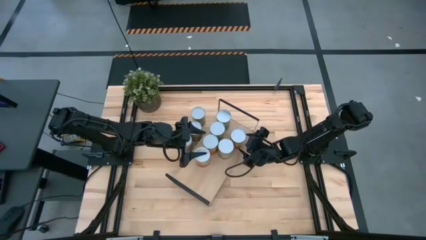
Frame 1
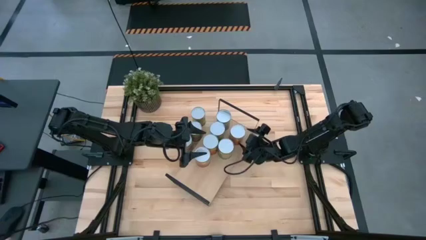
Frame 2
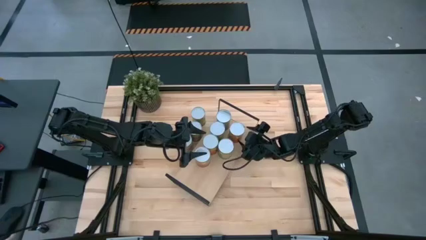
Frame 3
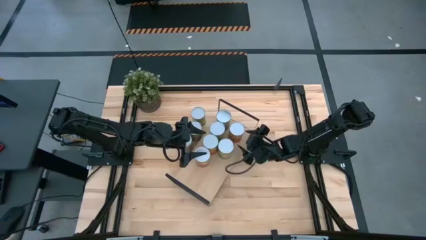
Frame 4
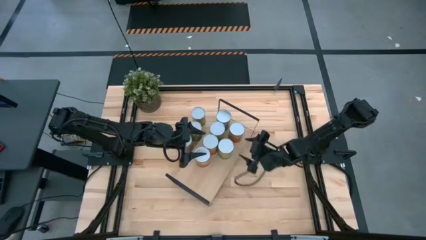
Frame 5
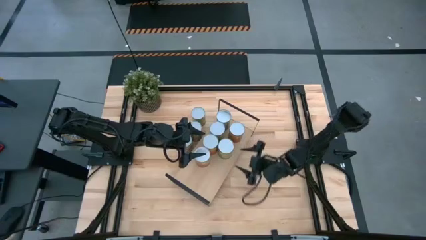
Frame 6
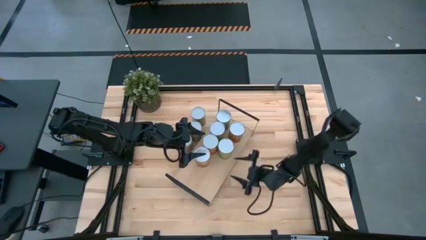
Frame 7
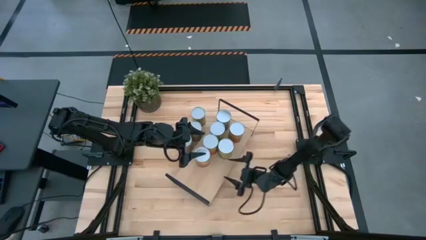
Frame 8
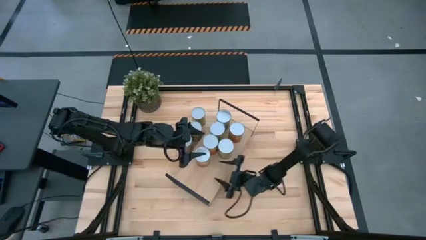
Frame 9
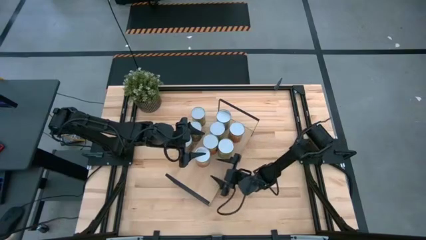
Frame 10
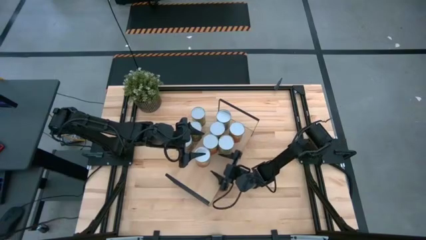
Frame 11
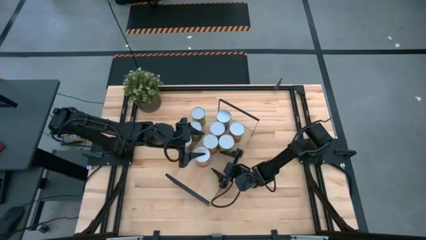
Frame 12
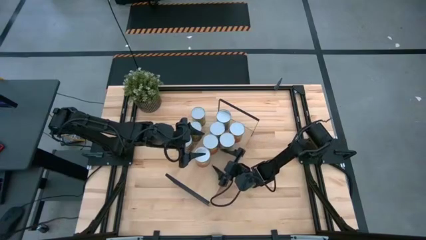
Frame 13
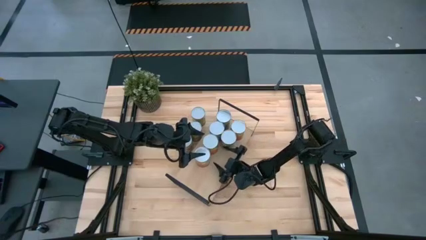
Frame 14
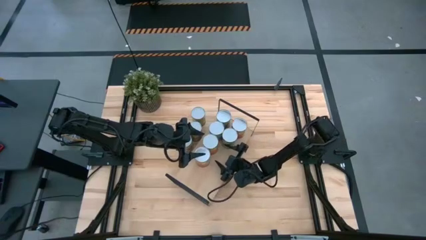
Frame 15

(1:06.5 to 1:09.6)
Task: Pick and place cans onto a shelf
Adjust the pineapple cans to the right of the shelf

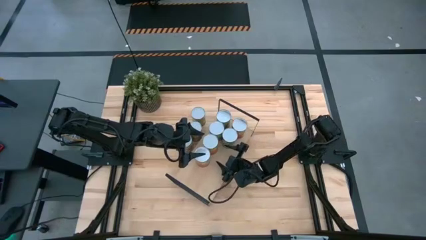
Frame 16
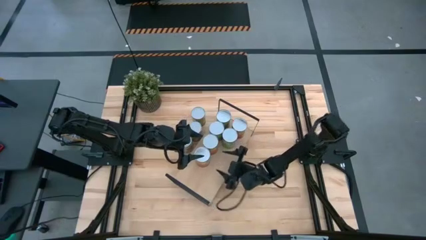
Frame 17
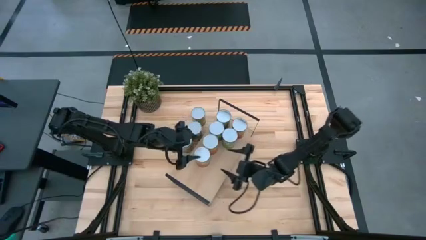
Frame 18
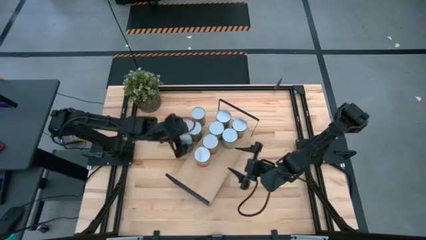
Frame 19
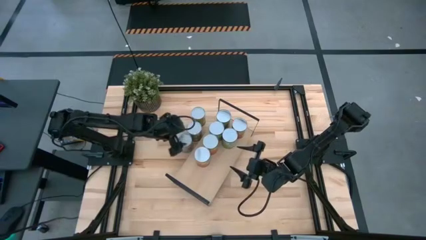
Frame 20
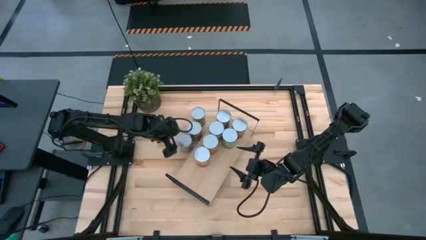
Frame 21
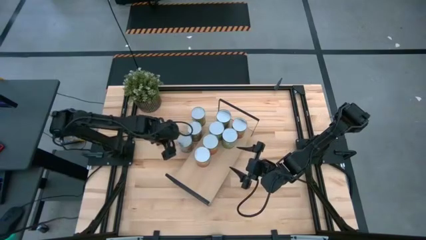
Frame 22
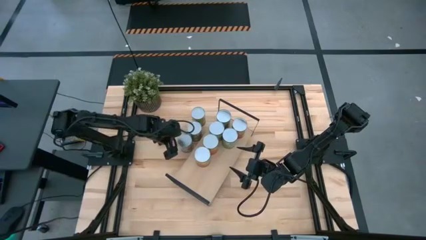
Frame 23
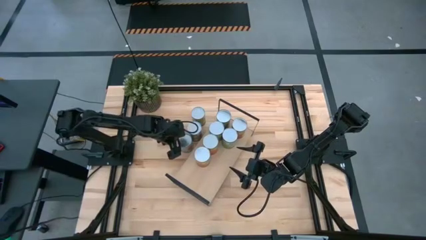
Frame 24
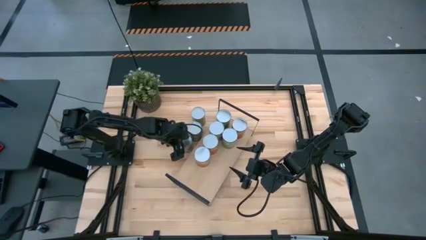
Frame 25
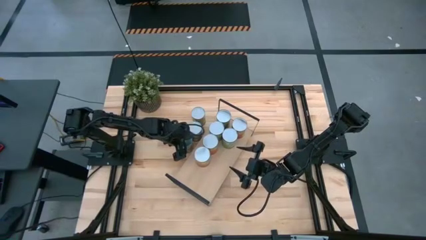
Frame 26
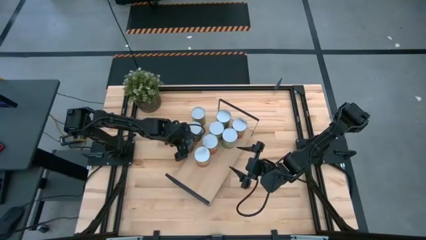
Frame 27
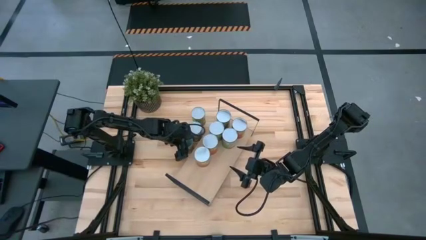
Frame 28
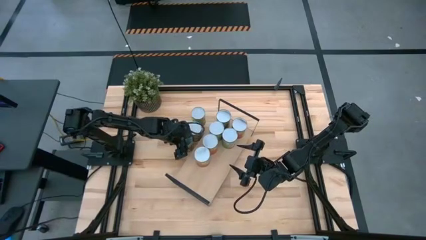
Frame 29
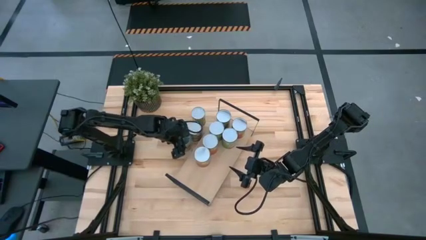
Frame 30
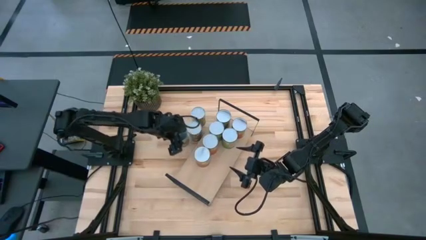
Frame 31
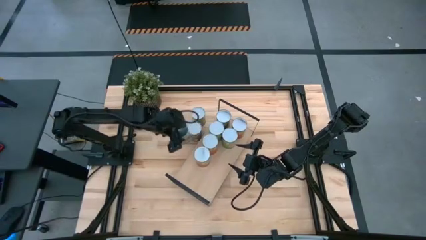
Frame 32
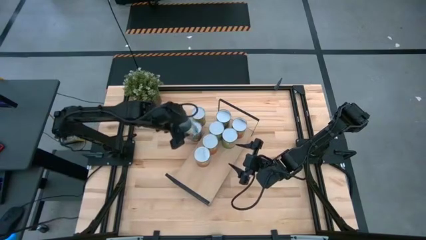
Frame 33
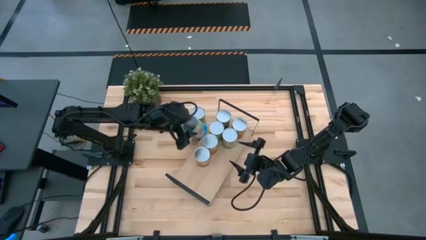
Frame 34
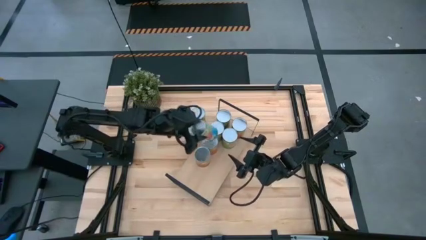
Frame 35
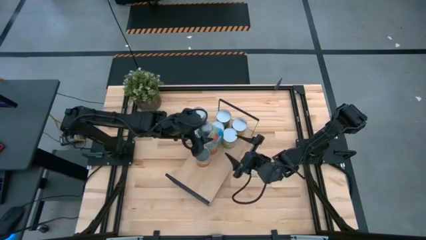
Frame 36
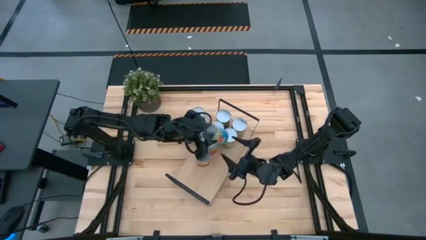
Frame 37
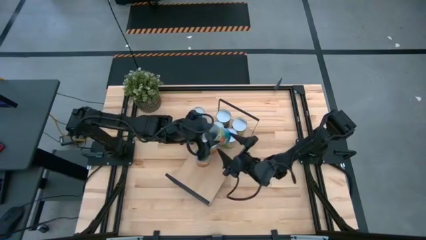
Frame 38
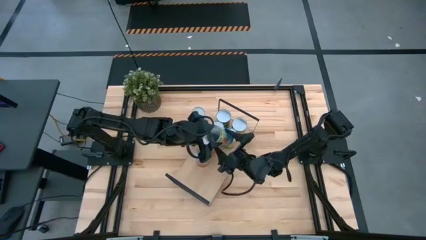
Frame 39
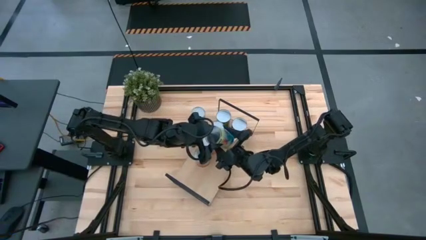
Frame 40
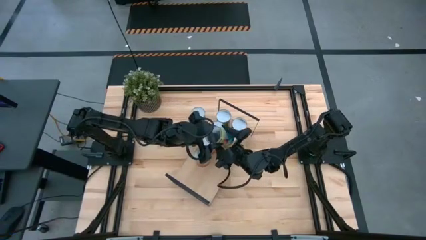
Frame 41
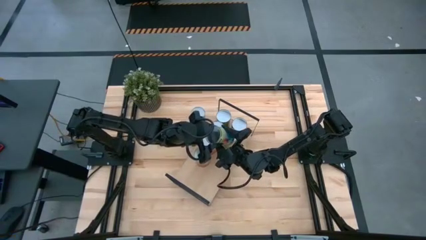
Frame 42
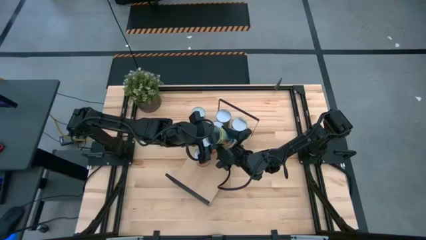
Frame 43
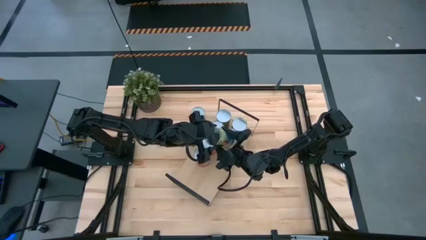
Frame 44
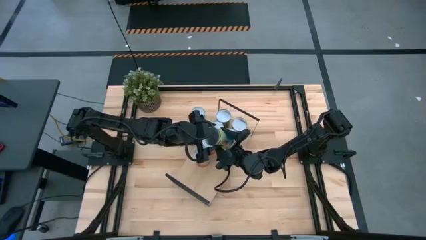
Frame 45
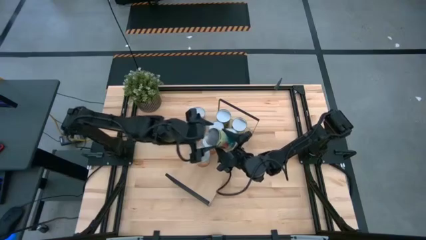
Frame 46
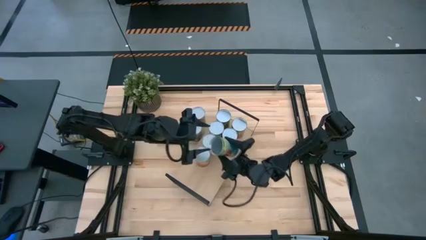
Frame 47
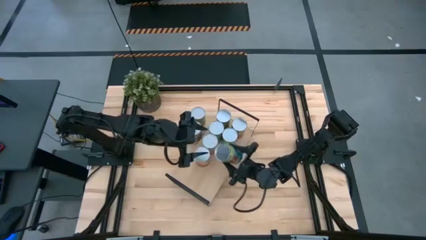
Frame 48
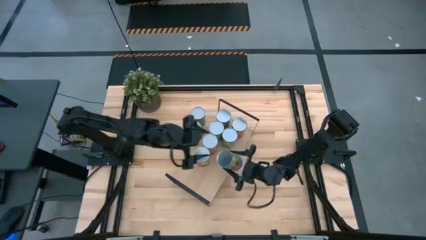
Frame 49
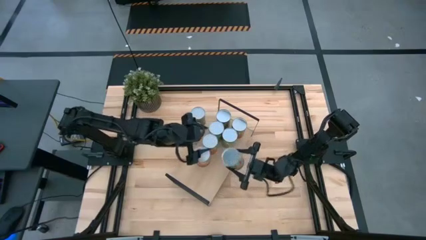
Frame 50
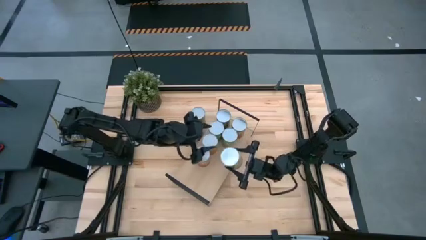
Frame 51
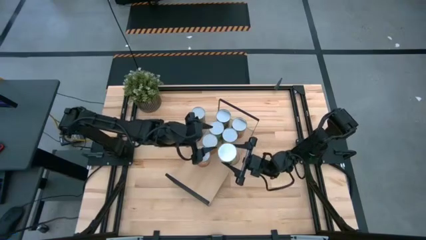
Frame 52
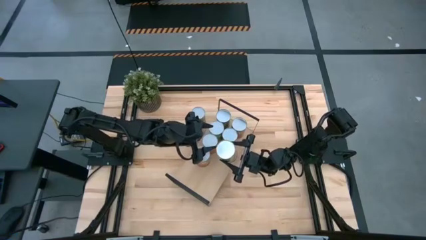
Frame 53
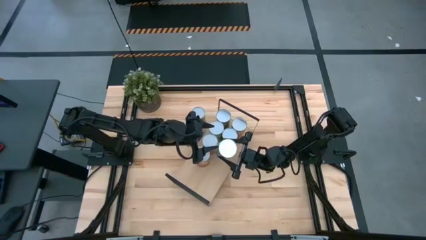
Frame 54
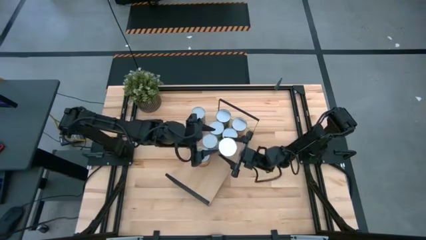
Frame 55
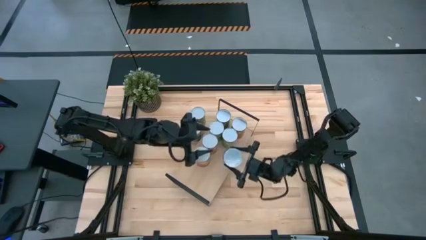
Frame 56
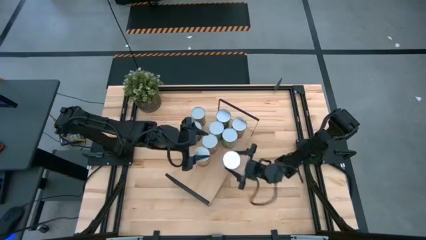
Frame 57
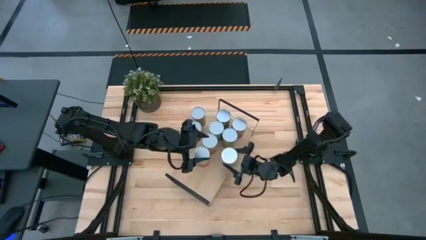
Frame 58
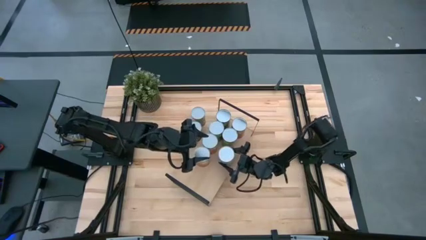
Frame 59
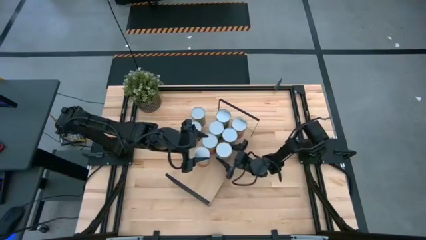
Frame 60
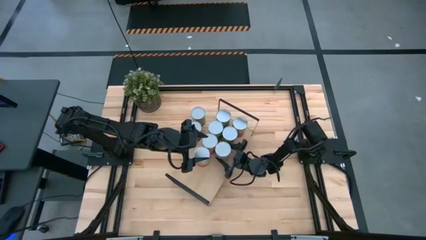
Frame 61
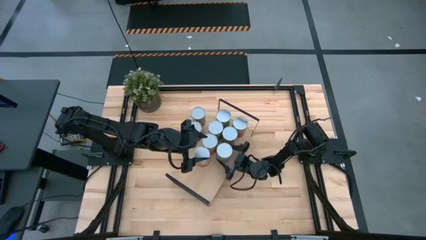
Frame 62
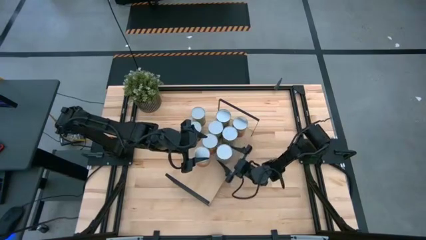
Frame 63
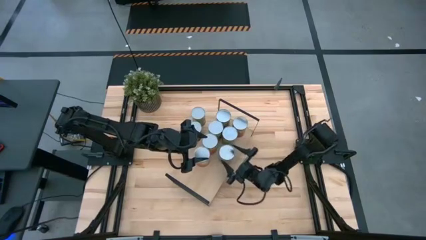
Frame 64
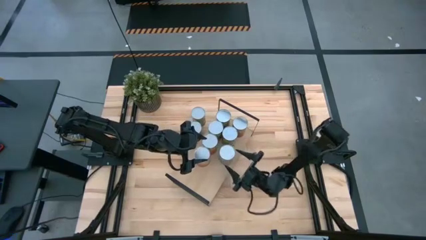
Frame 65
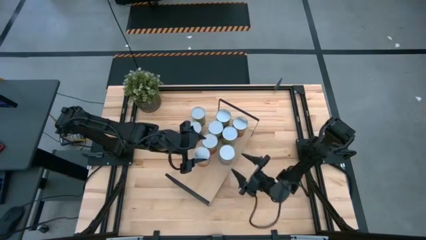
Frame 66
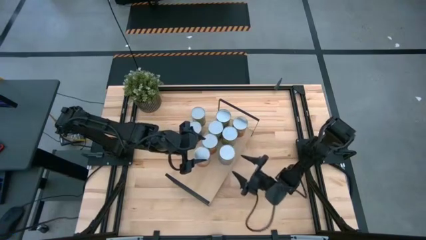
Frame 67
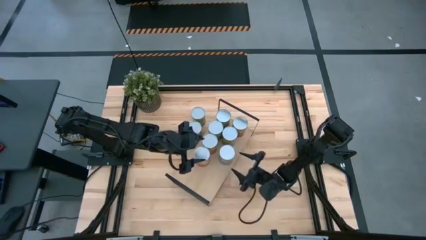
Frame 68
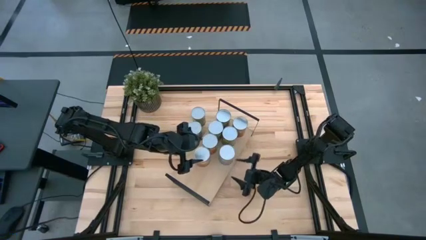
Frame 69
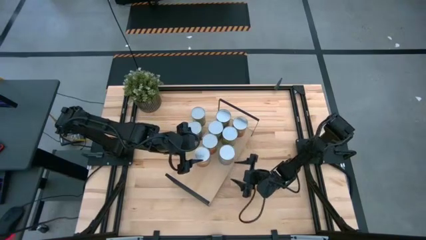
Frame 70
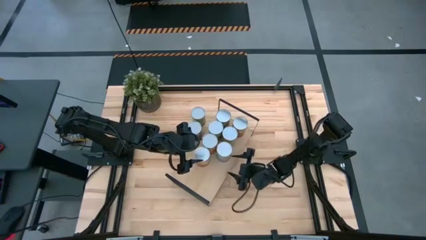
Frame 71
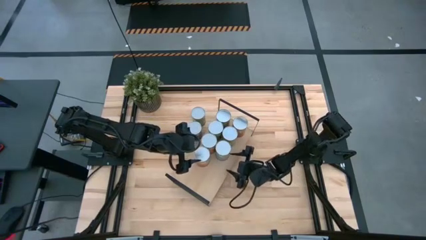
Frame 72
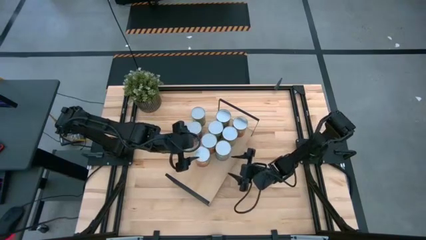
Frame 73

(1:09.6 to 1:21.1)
Put the canned tomatoes on the shelf

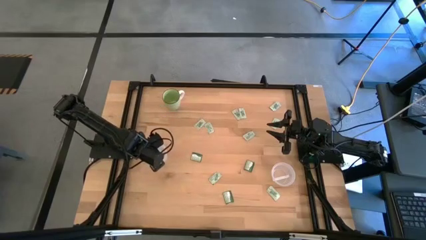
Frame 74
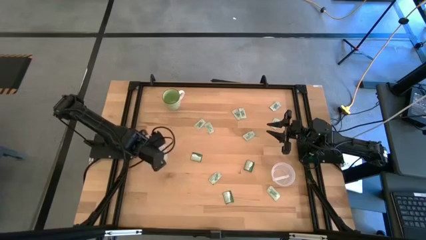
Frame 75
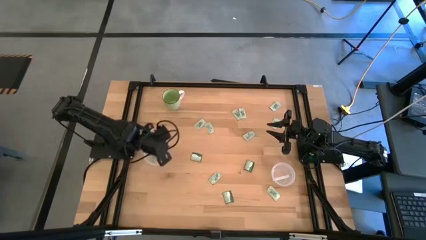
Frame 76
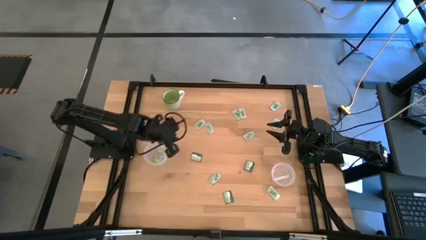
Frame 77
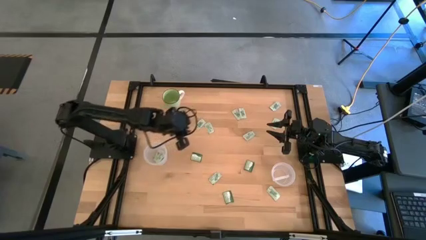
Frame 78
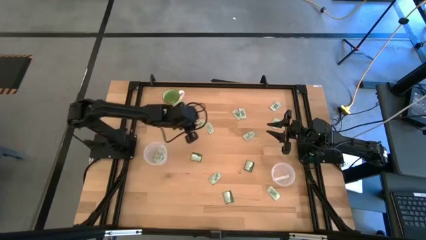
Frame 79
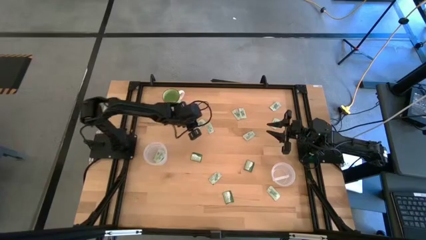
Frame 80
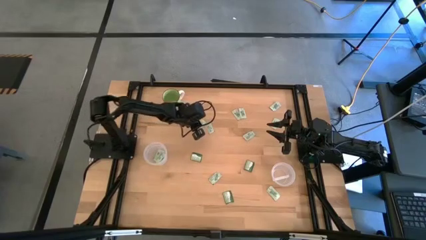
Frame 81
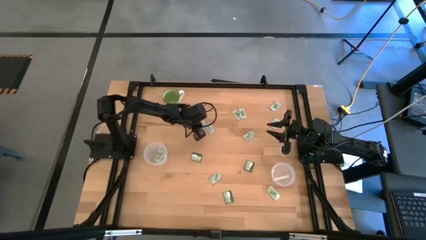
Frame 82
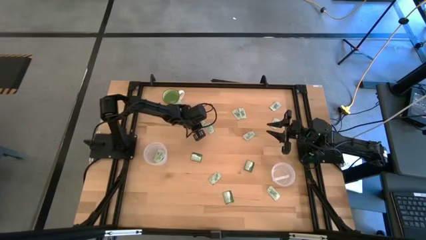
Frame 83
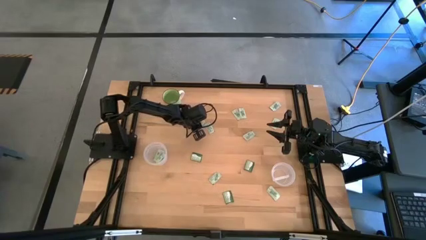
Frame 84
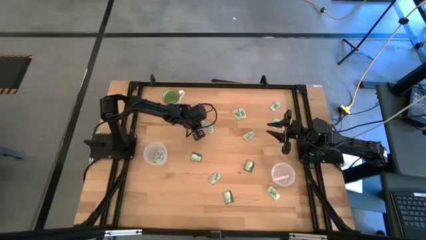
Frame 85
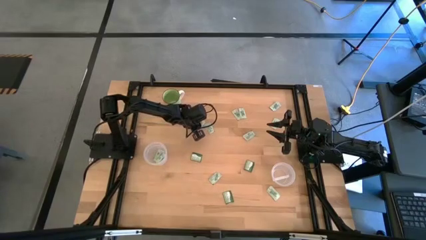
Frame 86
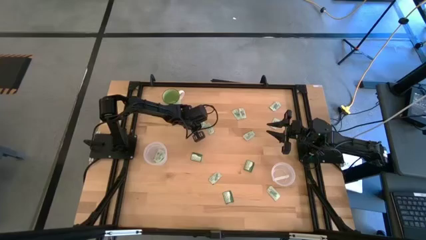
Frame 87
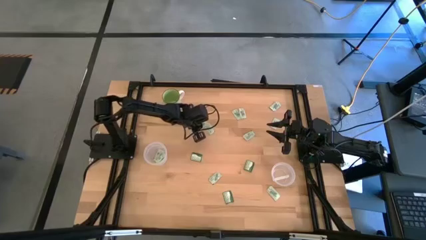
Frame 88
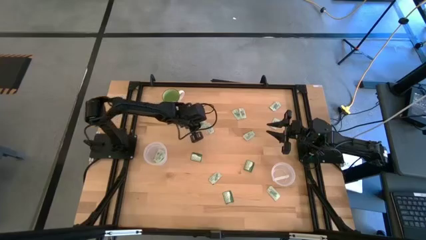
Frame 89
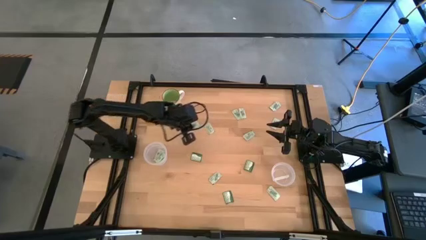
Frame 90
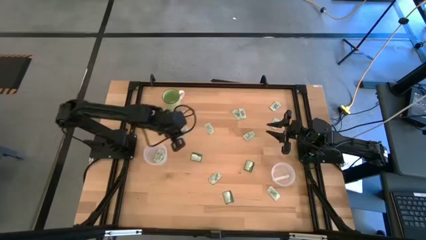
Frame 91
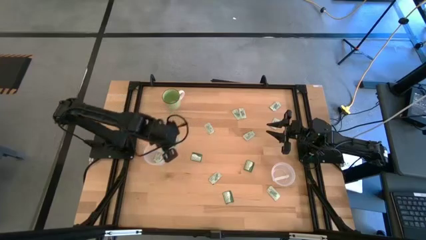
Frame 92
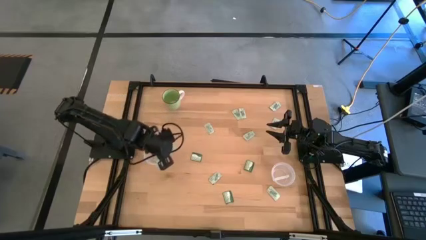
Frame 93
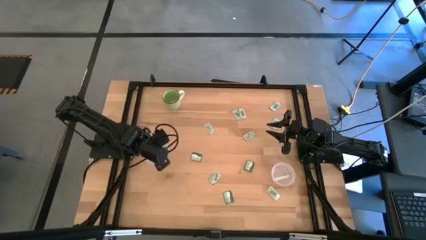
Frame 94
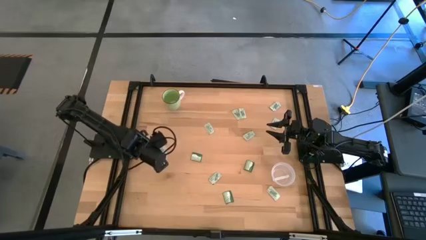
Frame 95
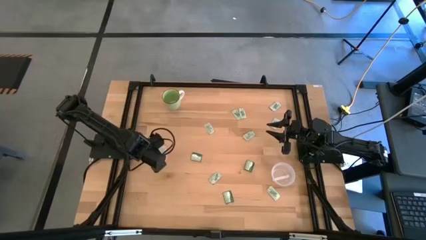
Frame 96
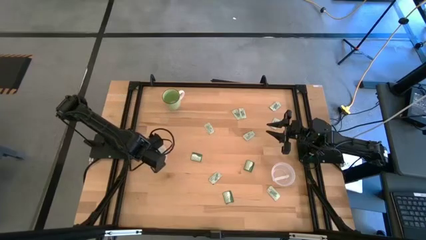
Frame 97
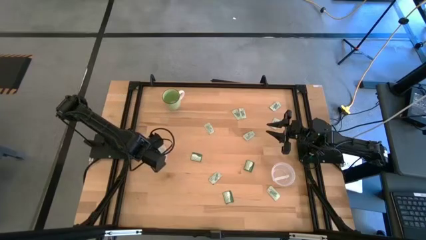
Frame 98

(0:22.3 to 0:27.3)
Task: Pick and place items into bin
Put the stevia packet into the left transparent bin
